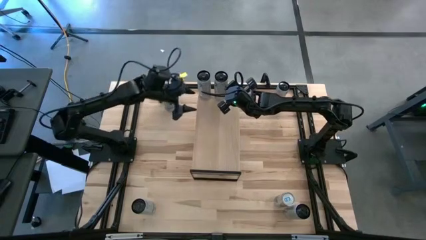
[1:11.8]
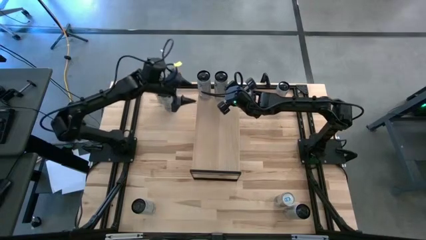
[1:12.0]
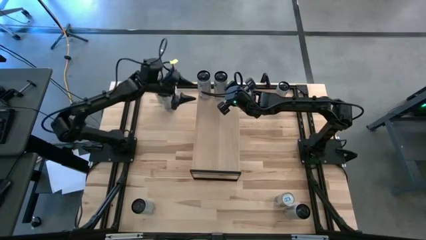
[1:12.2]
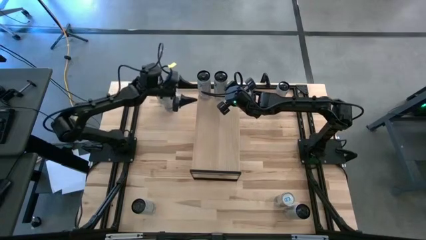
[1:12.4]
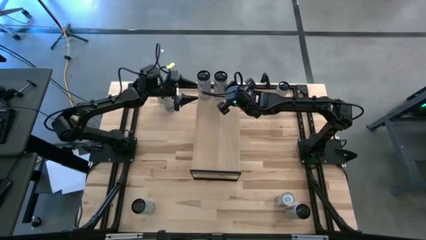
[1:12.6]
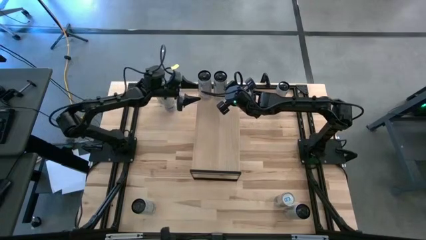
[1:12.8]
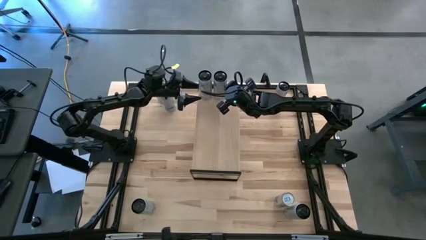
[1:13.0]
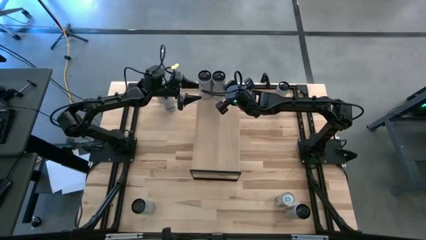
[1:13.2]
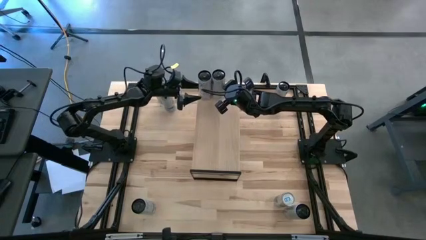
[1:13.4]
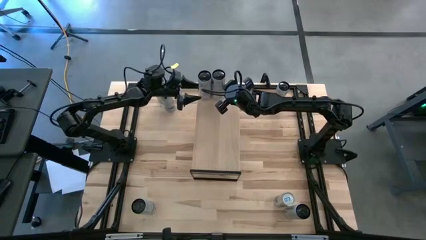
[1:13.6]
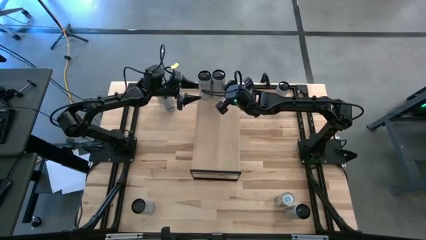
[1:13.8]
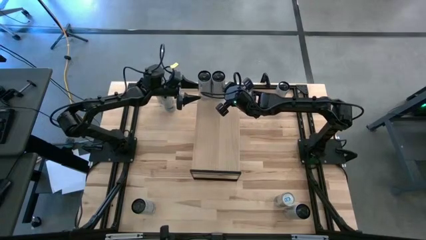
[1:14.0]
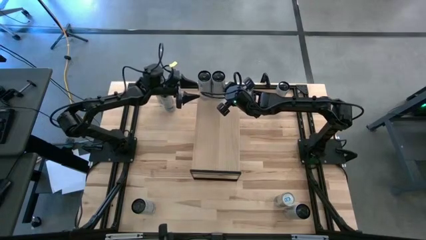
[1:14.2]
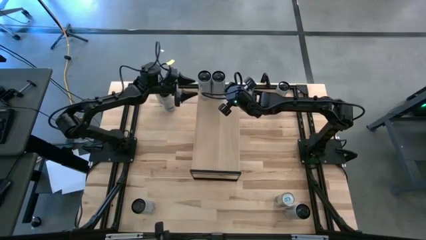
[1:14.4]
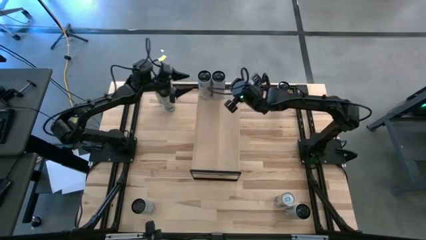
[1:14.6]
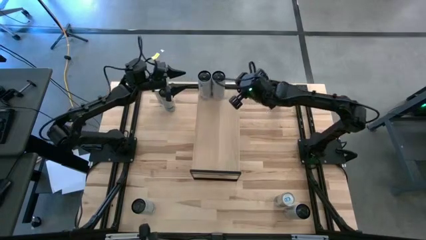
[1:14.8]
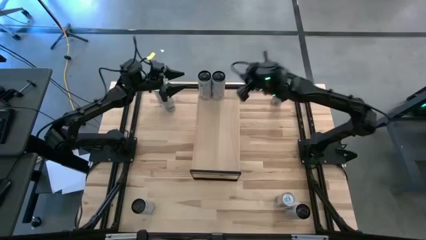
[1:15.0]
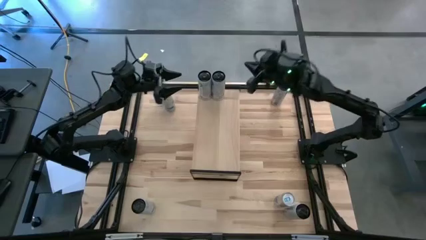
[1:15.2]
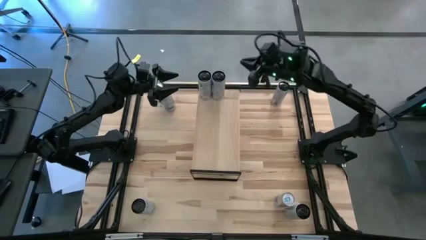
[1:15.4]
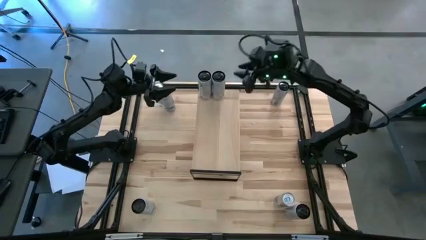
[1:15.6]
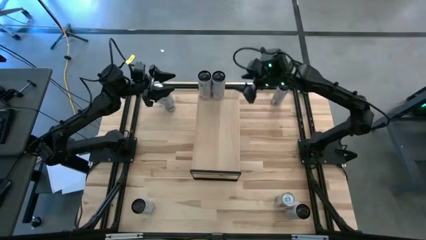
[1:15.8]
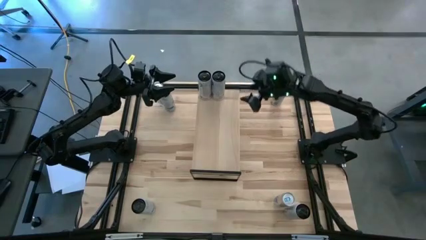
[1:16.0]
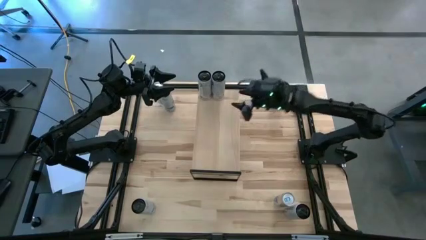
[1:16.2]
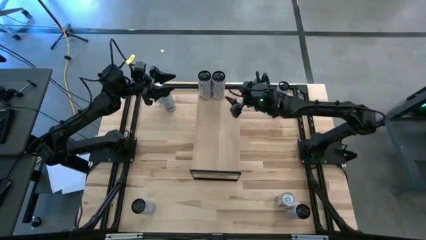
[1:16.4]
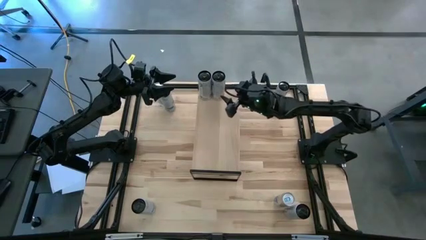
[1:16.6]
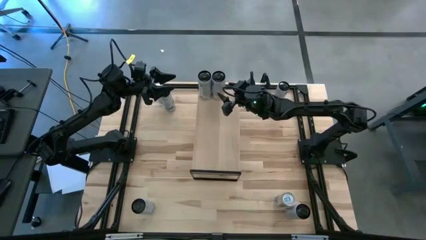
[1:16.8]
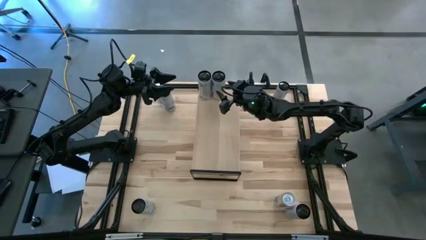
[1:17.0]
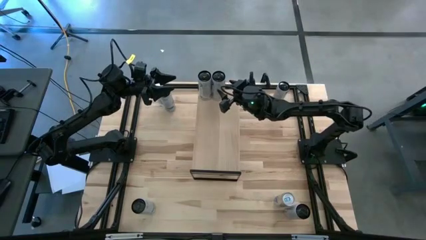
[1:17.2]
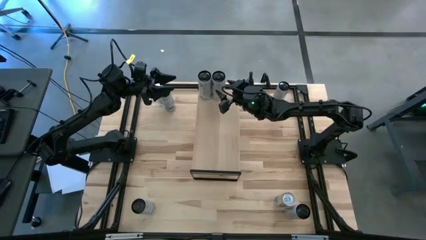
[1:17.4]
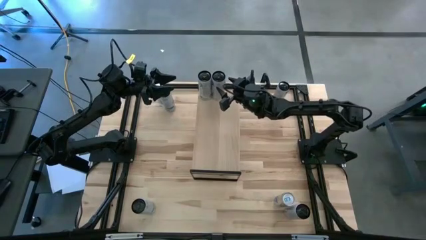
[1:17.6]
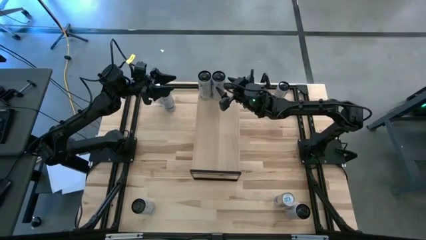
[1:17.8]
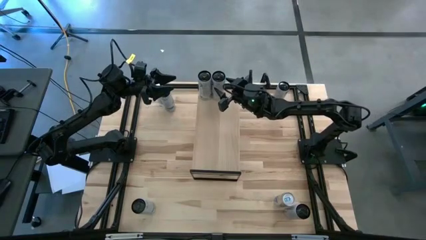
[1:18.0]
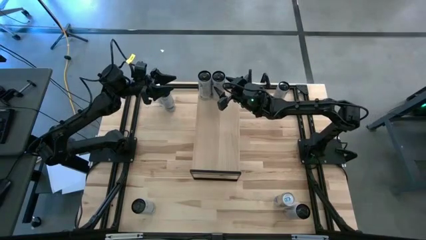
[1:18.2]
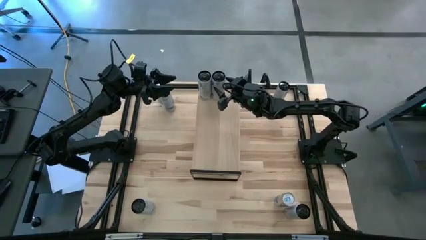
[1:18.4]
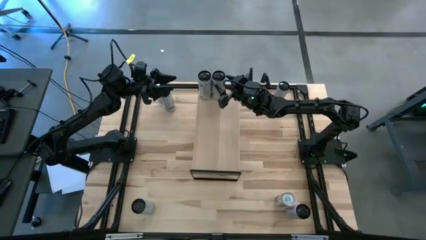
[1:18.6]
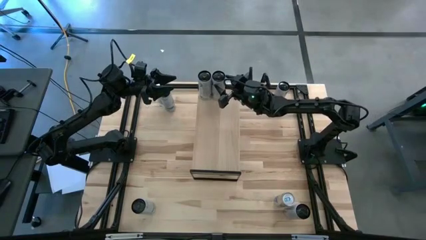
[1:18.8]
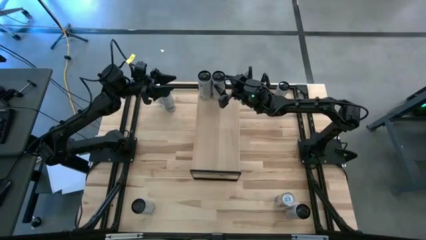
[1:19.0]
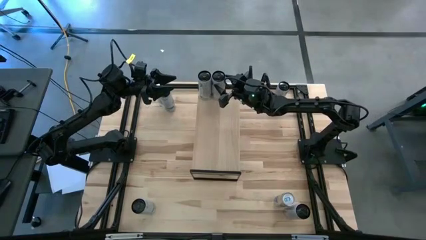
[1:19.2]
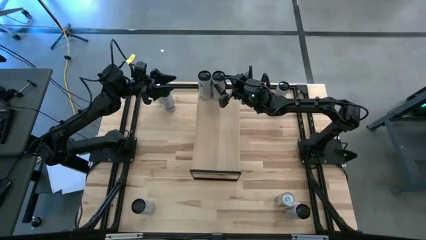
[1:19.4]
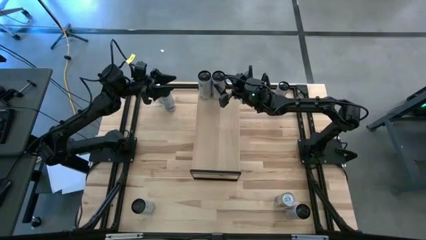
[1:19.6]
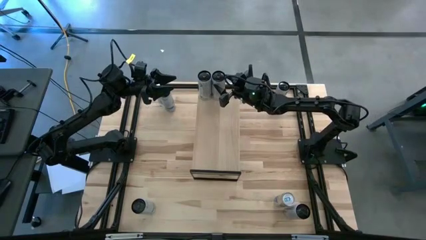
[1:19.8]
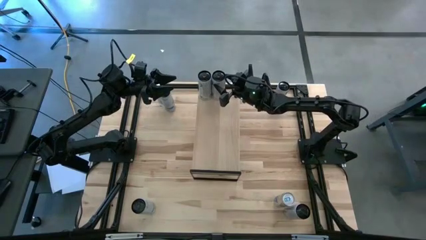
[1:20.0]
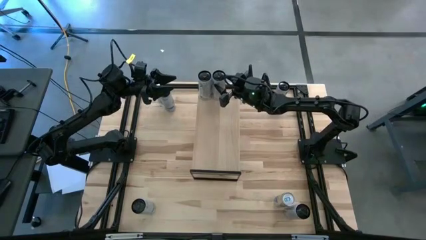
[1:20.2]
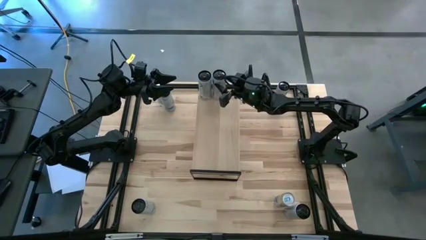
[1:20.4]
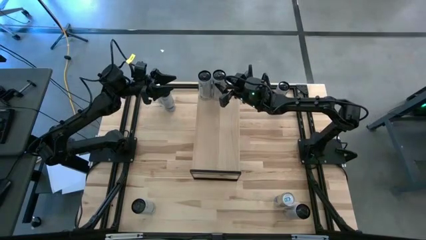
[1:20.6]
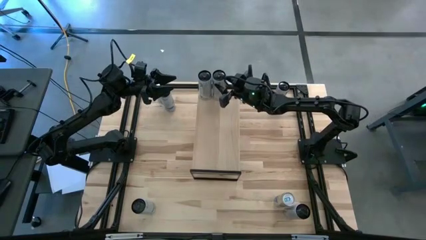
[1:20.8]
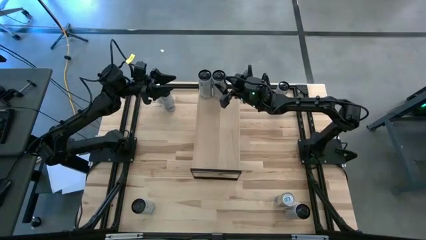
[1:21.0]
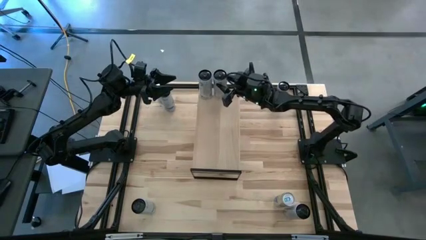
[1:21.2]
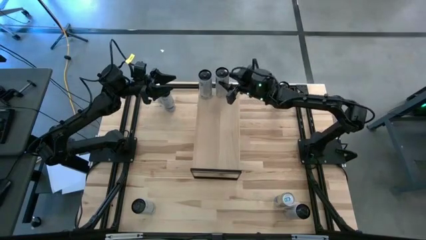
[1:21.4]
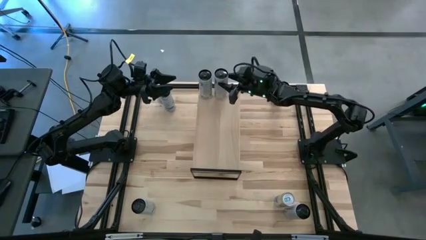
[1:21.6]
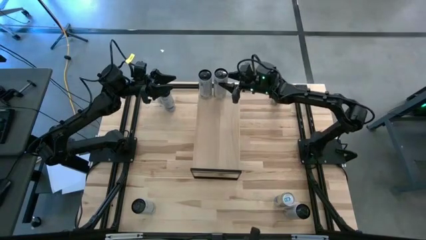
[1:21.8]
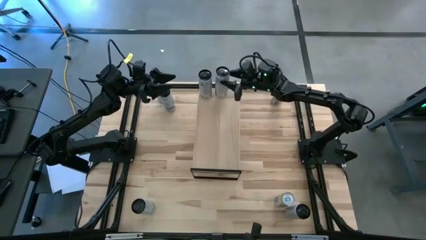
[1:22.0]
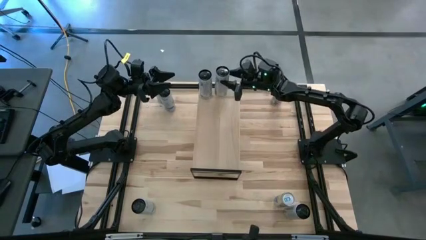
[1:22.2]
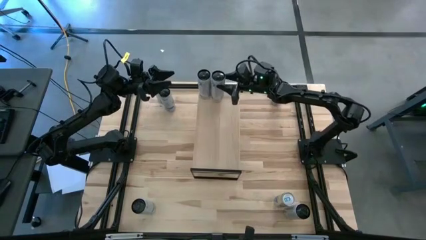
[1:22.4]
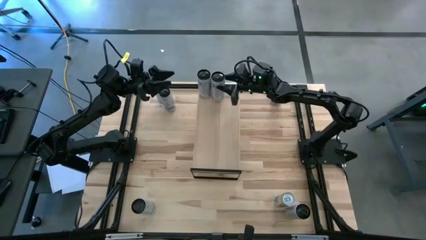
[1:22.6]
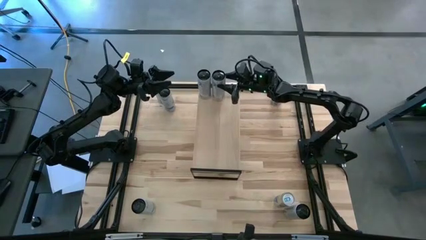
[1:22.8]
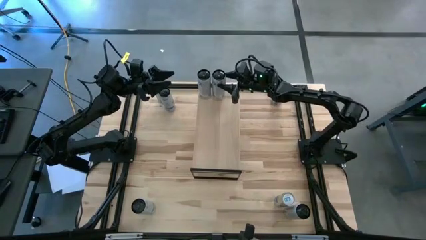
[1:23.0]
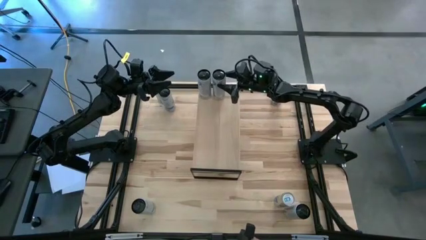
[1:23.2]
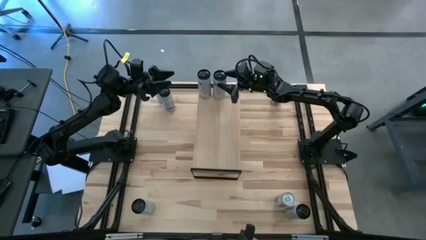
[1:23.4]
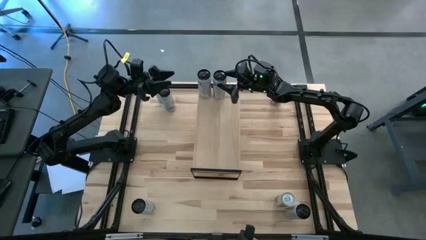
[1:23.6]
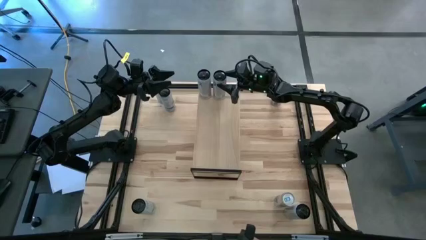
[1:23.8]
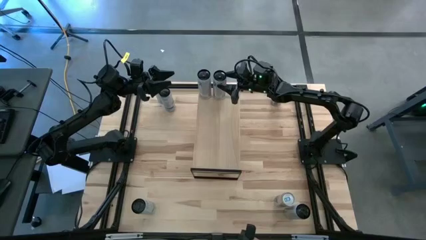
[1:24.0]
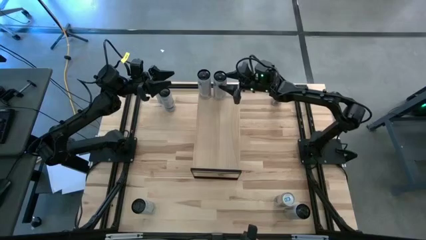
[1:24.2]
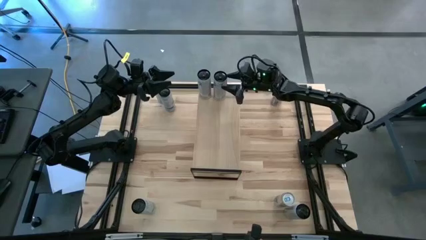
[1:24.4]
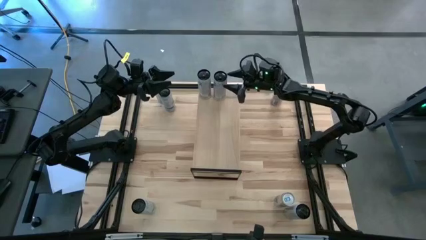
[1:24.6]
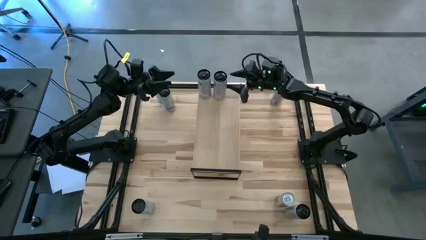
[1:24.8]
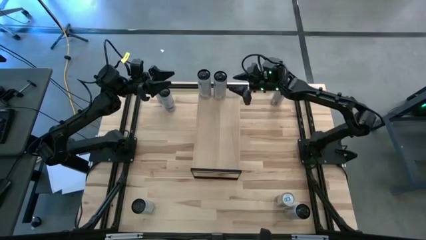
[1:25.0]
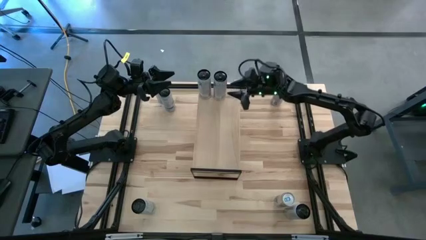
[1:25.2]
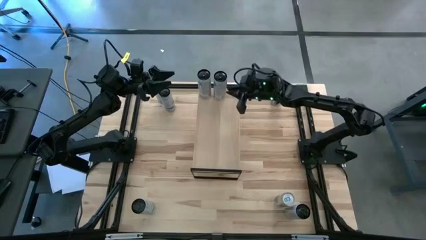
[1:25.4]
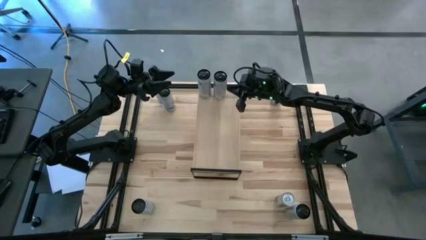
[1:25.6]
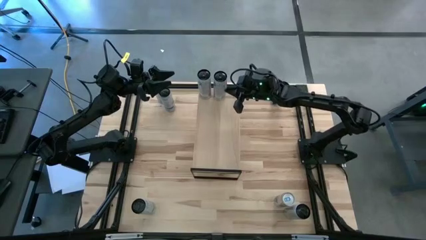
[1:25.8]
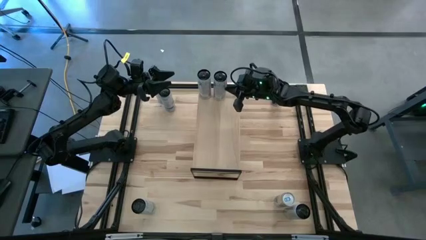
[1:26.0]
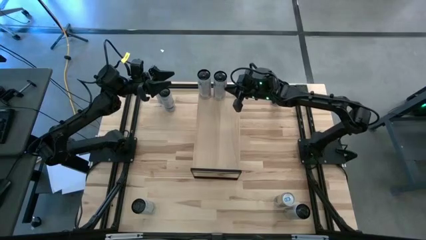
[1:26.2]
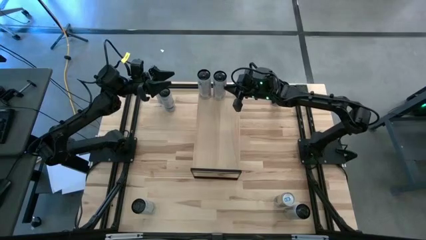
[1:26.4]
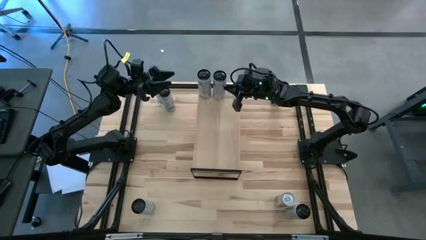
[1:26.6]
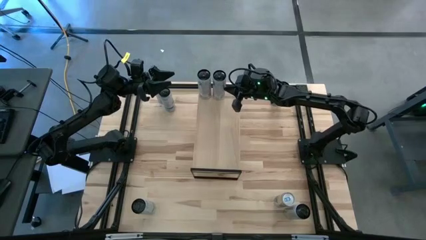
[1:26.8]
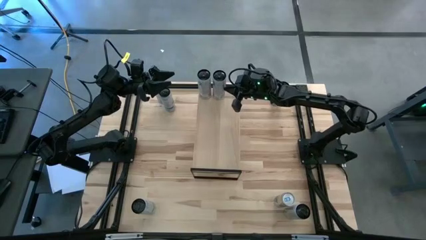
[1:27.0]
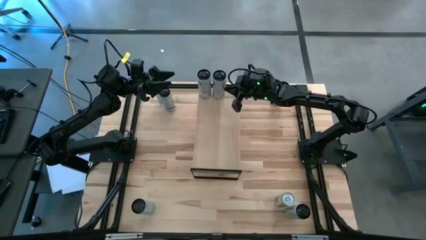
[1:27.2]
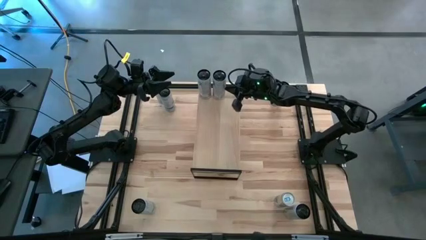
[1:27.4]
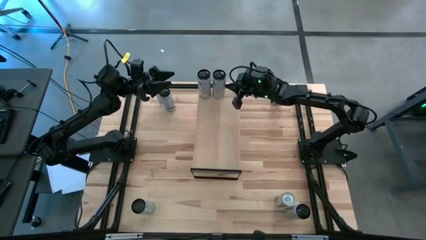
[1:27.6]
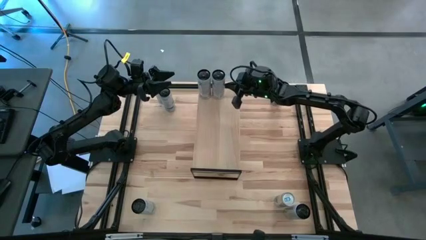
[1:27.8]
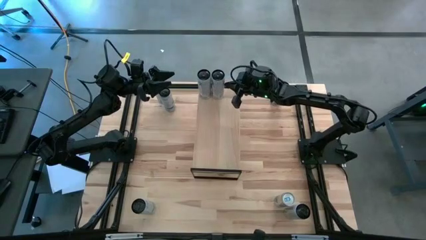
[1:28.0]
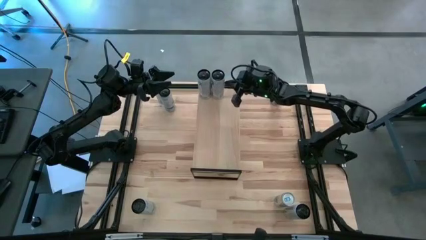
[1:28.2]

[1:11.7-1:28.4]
Task: Place canned beverage on shelf
Put the white pink soda can on the shelf aligned with the white pink soda can
